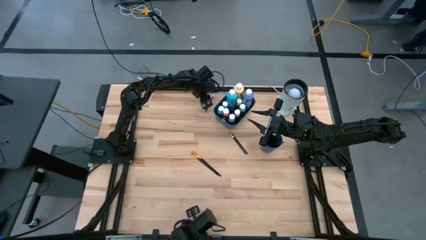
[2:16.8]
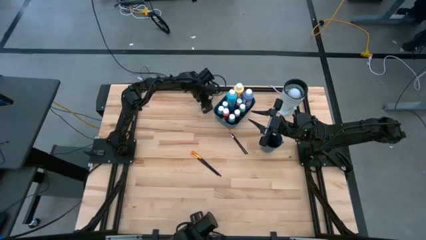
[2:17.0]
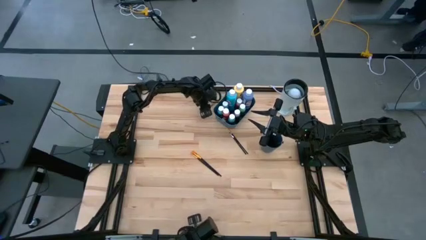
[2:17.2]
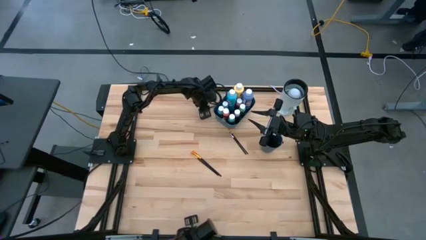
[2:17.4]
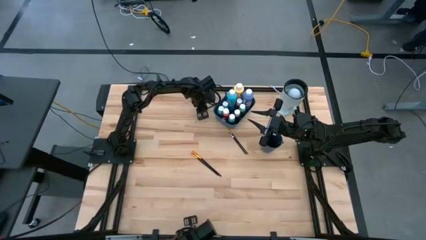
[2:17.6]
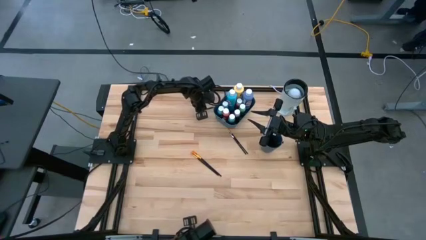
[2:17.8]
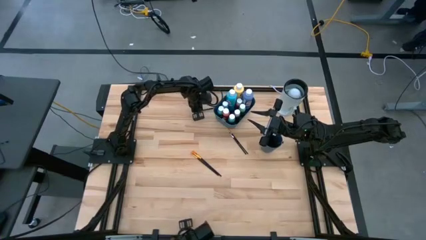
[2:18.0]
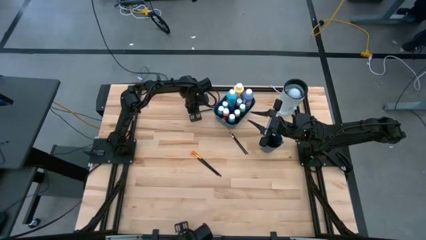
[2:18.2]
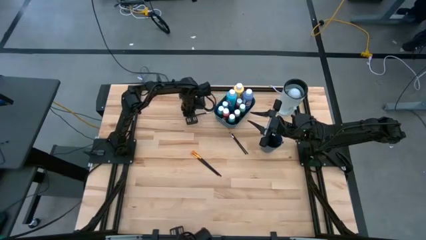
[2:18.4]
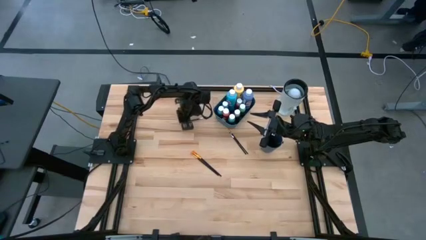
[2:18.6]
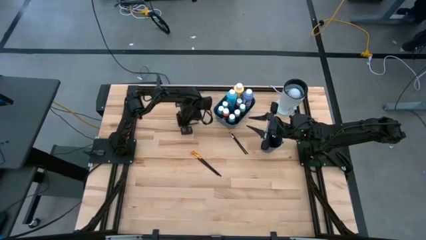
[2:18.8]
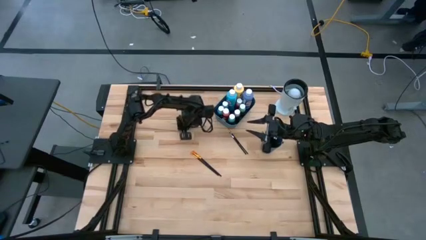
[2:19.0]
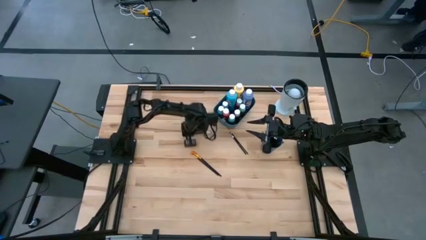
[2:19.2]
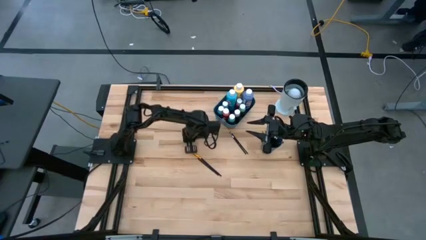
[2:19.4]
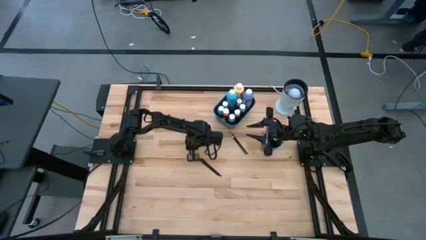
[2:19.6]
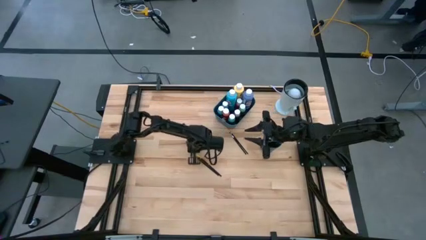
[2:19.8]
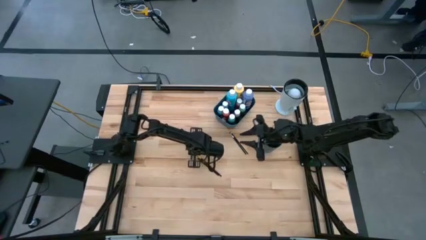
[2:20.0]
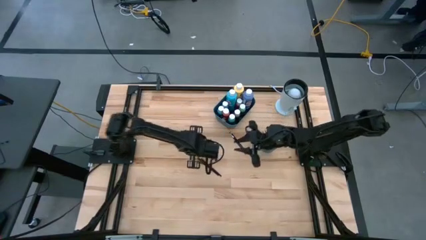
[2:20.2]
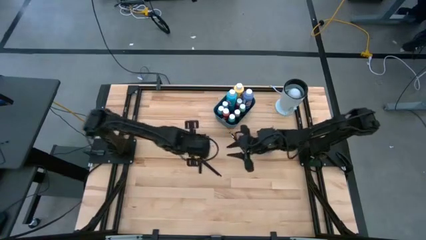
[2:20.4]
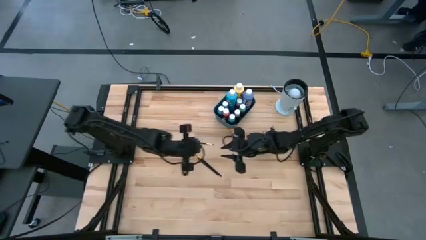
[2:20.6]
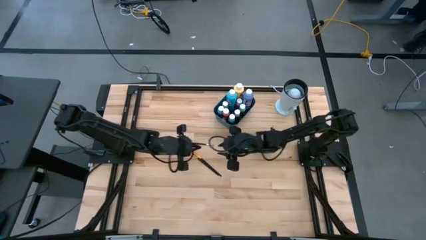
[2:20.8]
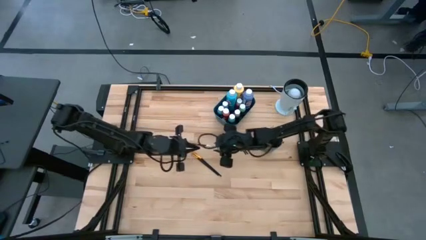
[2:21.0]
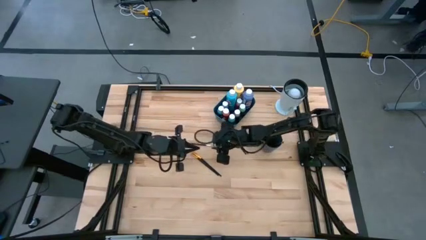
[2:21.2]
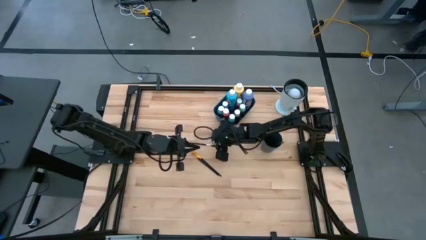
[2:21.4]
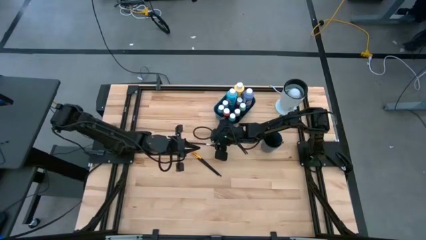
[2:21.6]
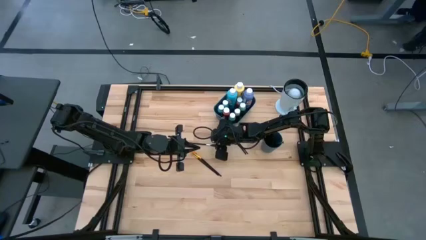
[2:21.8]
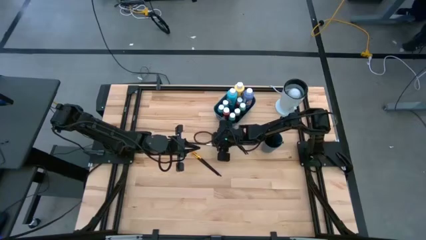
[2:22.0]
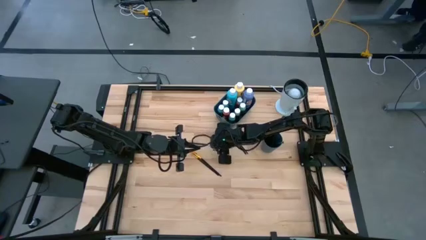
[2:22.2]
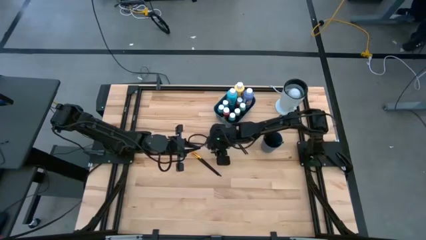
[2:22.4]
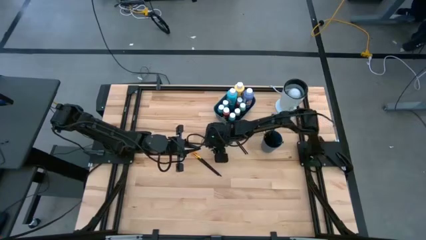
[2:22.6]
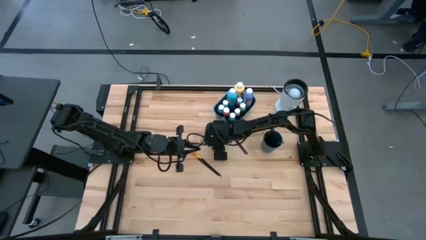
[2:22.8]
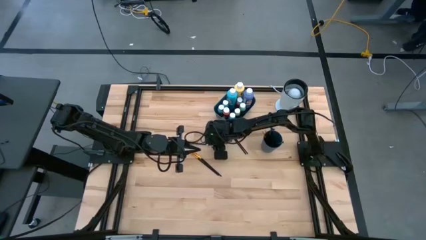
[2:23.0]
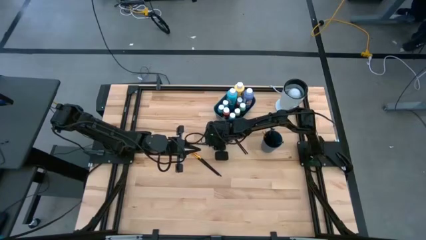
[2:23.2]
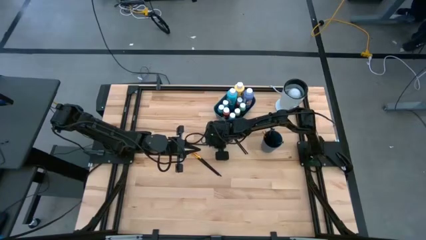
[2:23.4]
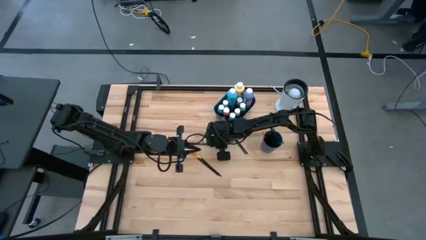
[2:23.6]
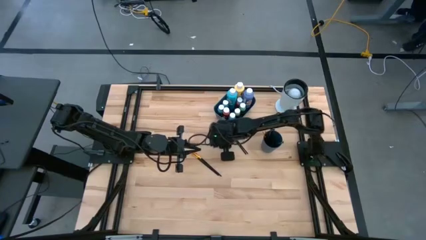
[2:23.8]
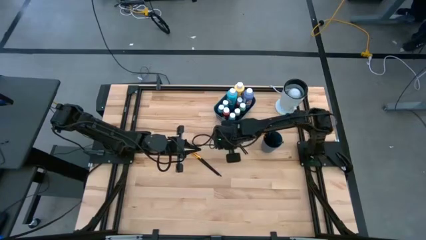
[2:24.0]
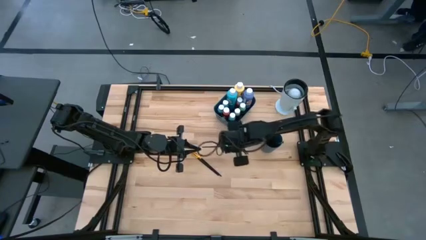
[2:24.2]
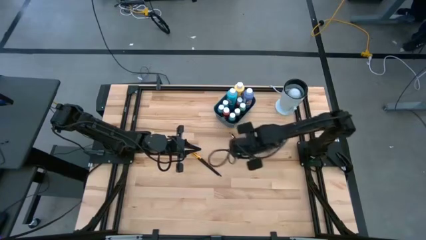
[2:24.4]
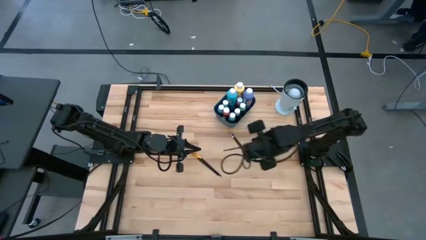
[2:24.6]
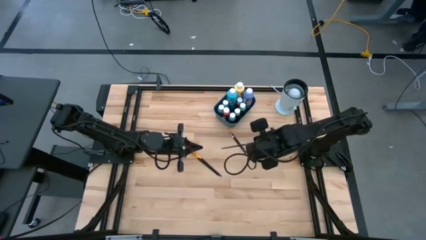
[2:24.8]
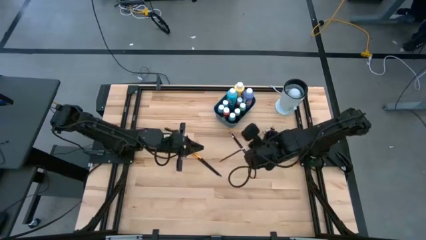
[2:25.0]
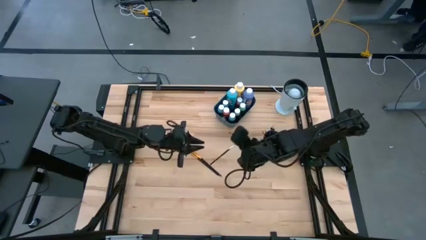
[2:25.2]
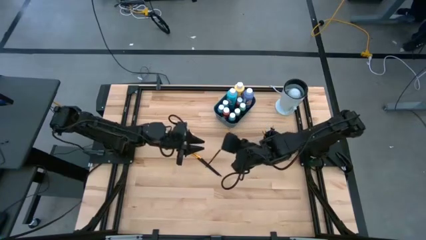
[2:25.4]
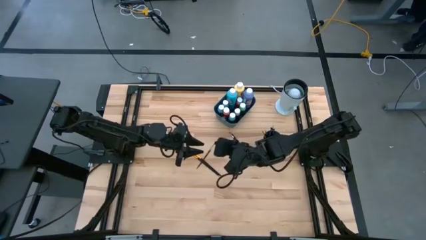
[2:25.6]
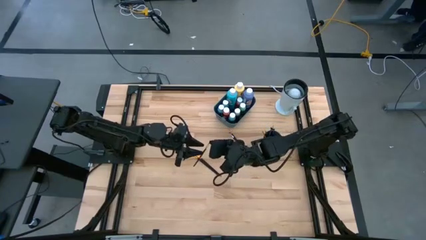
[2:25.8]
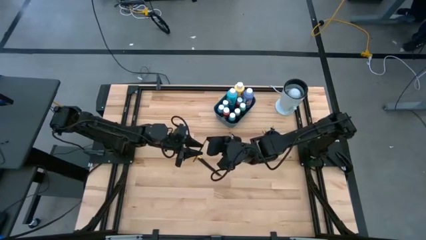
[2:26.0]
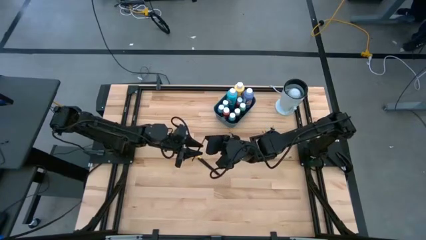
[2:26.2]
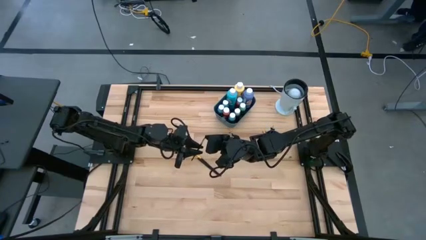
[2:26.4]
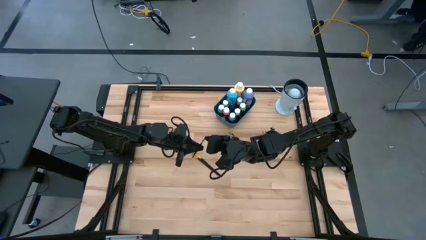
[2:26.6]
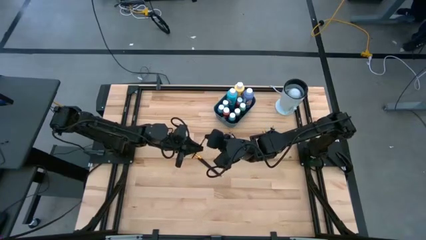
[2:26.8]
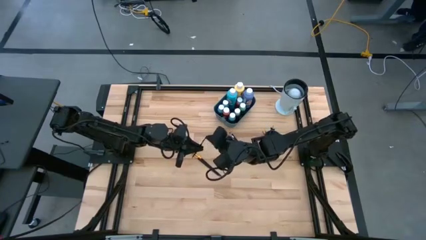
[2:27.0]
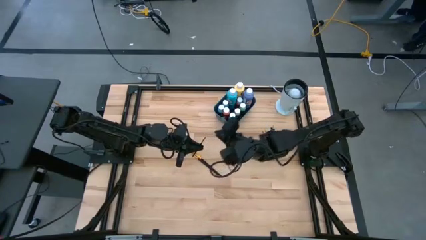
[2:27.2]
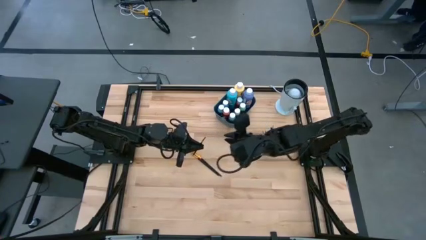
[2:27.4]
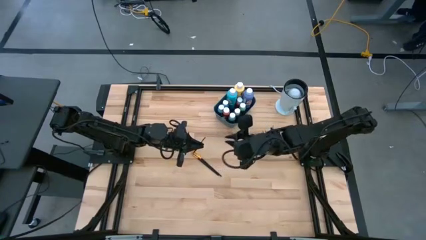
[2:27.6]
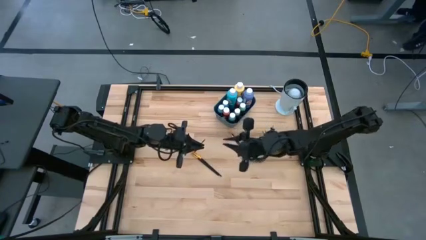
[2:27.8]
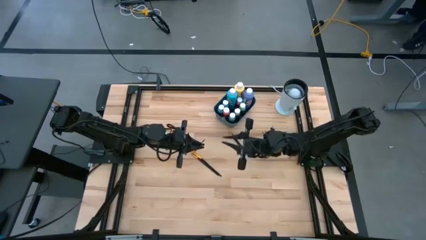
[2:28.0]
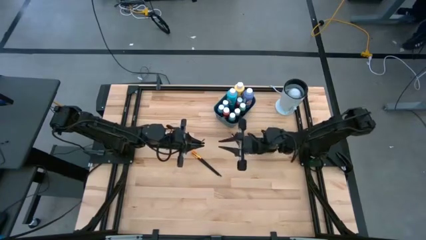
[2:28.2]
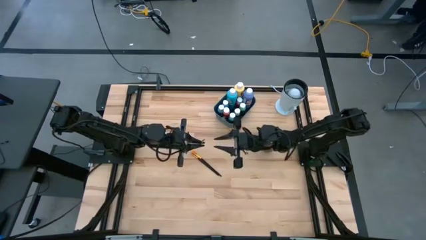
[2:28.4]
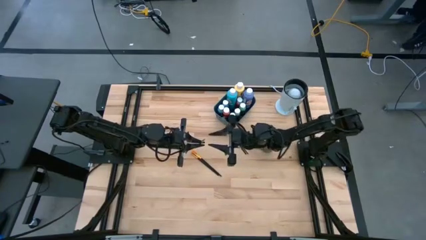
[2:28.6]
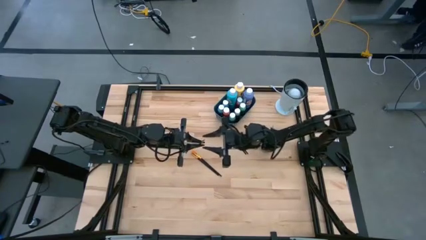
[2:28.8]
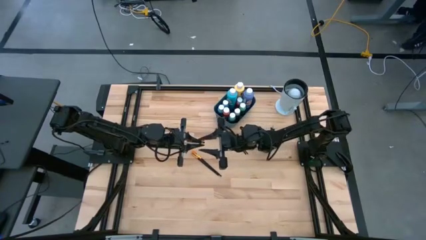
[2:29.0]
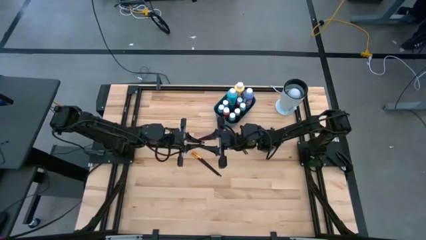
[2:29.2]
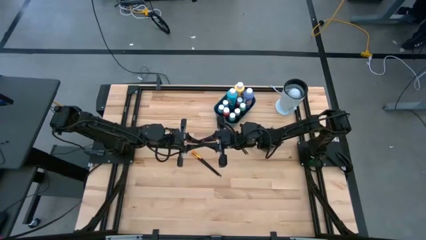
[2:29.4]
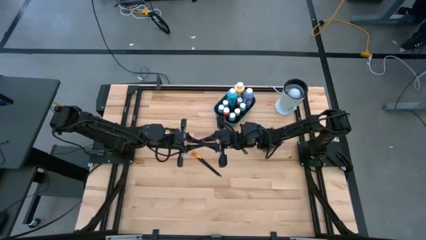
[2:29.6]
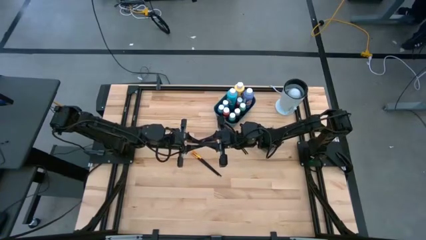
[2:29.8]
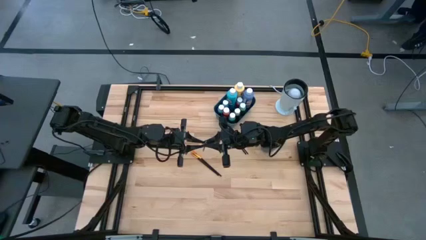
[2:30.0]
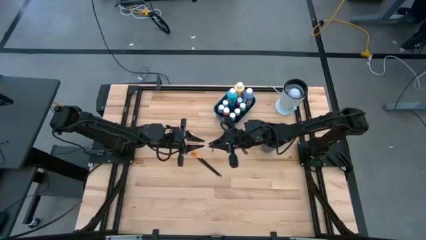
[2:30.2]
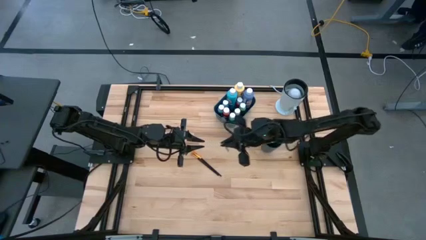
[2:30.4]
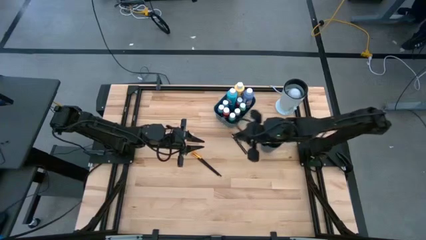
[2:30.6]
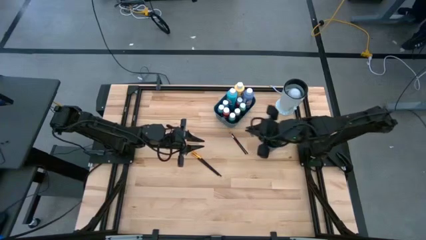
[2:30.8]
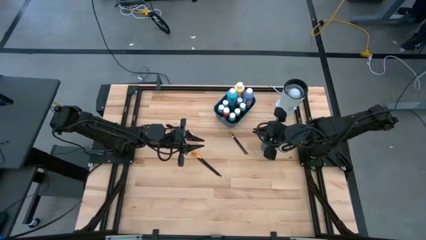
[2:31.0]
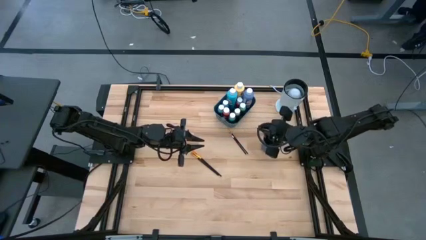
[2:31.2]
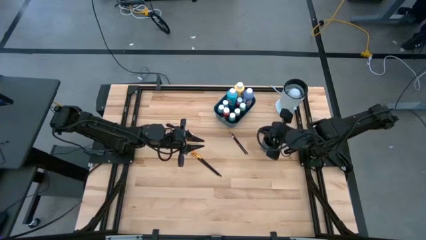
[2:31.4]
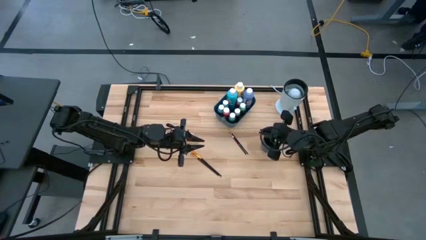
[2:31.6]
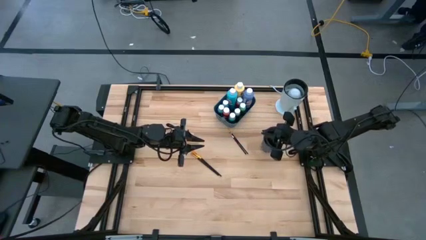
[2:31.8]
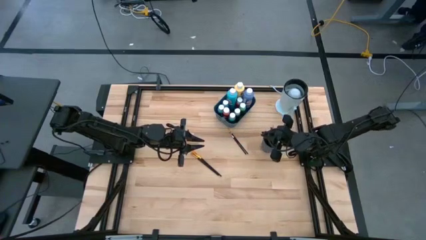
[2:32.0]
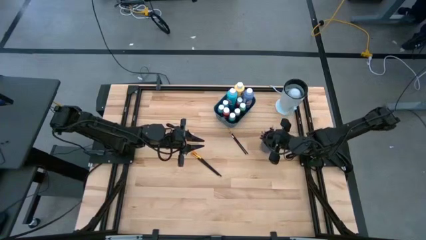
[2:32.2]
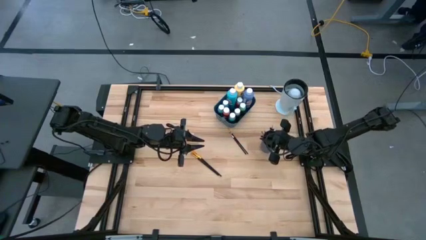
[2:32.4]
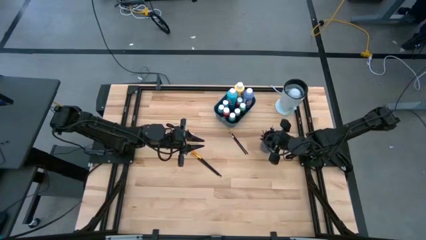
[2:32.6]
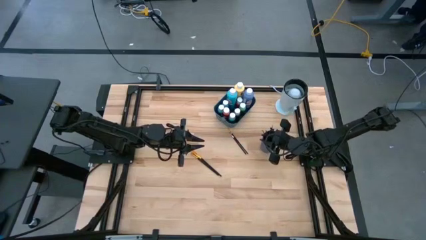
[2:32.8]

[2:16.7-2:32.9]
Task: Pick & Place Paint Supplies
Put the silver paint brush into the blue cup

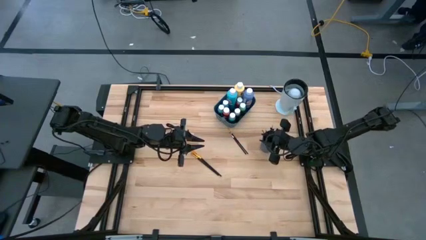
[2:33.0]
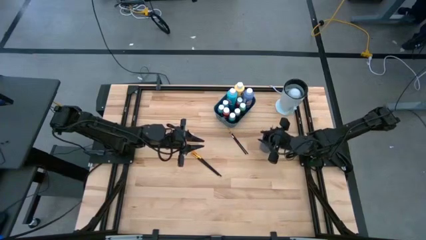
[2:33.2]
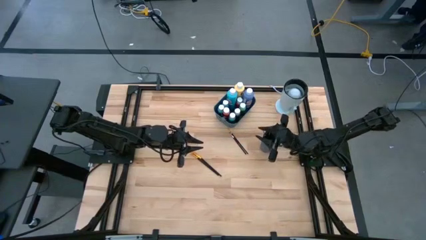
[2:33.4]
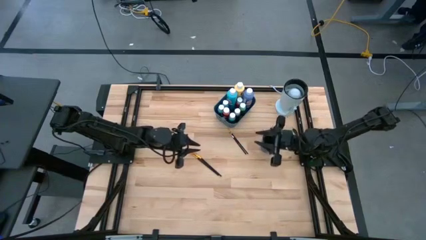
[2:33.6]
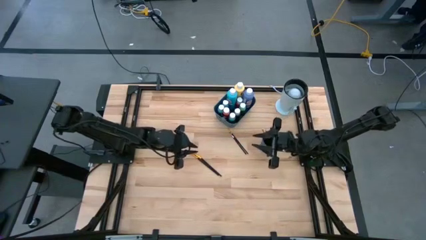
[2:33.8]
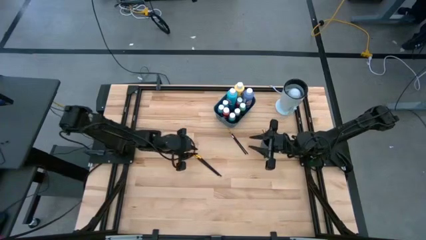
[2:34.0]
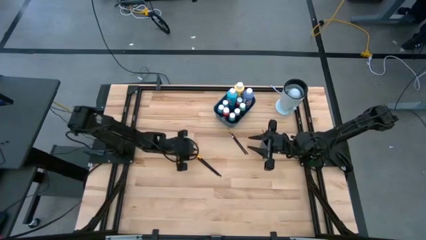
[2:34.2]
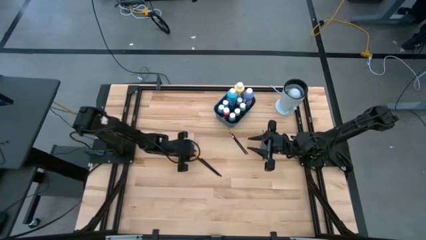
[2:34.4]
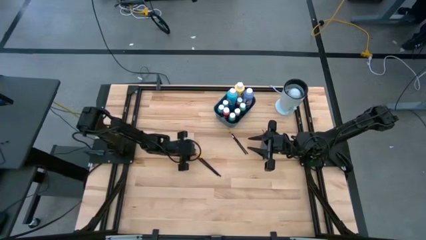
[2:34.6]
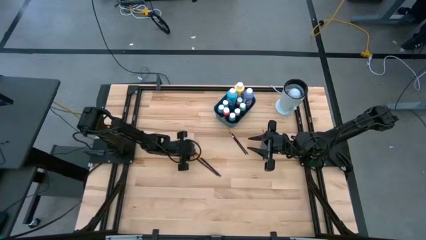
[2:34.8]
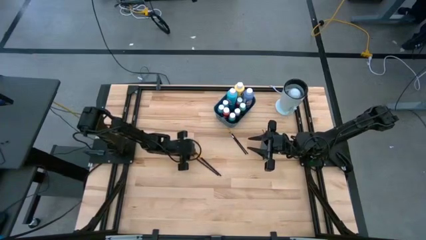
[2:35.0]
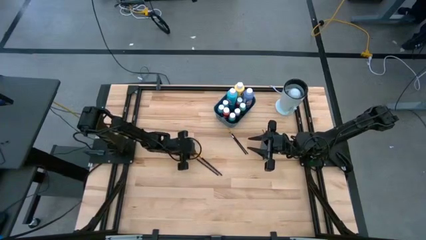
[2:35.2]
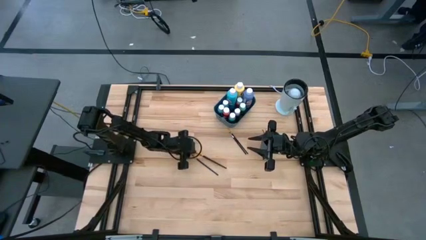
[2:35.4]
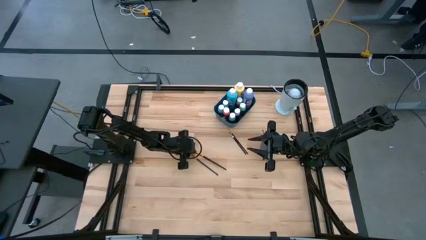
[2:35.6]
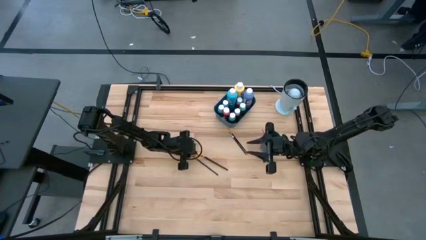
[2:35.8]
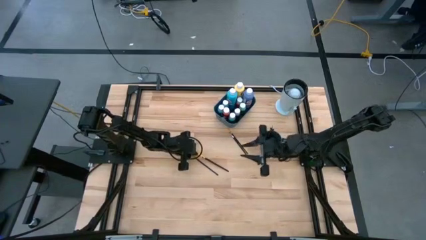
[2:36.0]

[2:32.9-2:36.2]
Put the golden paint brush into the blue cup
